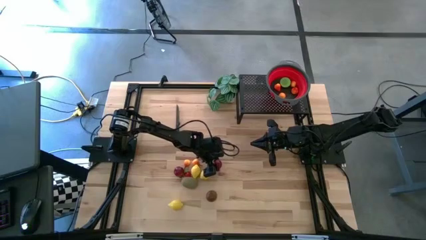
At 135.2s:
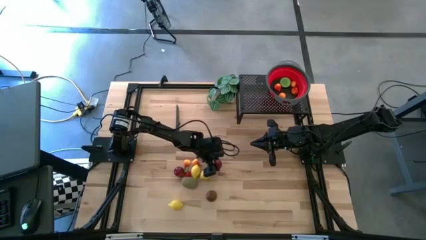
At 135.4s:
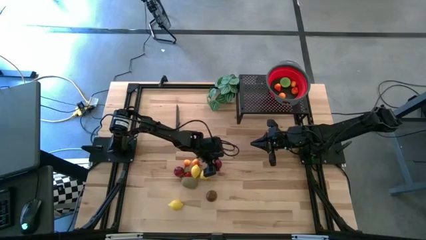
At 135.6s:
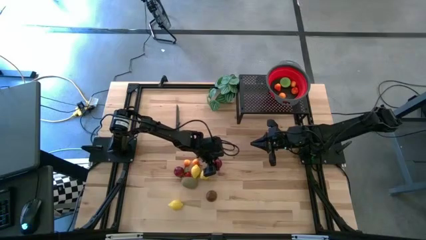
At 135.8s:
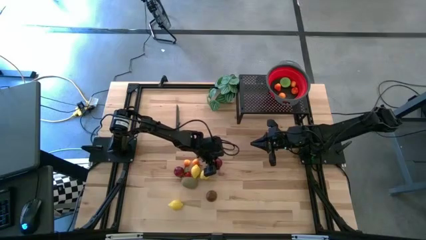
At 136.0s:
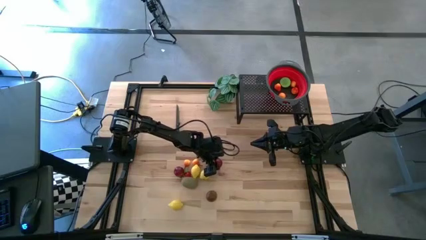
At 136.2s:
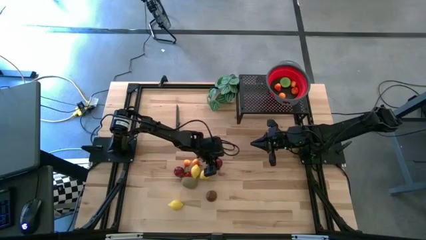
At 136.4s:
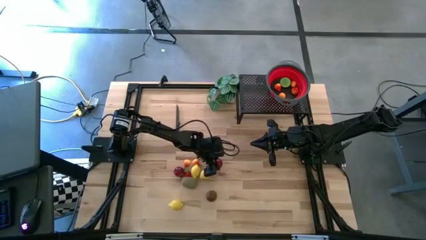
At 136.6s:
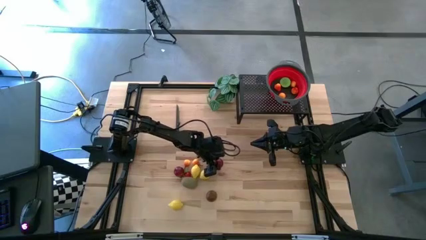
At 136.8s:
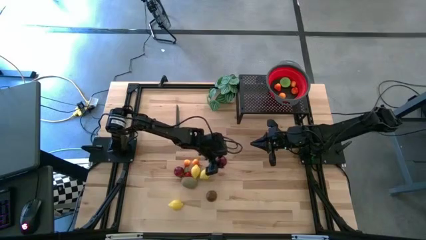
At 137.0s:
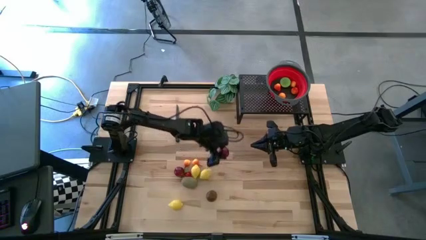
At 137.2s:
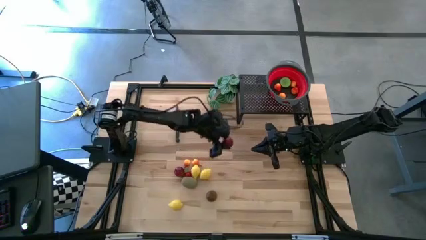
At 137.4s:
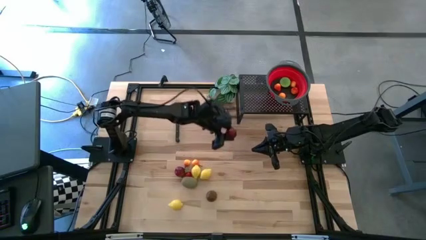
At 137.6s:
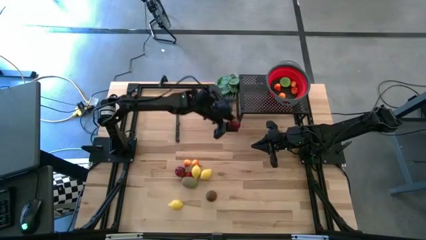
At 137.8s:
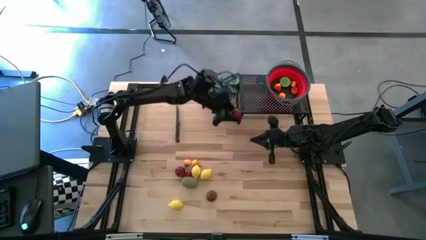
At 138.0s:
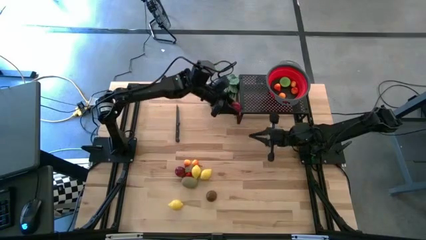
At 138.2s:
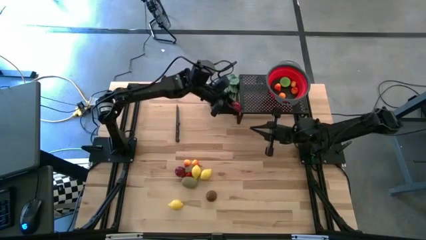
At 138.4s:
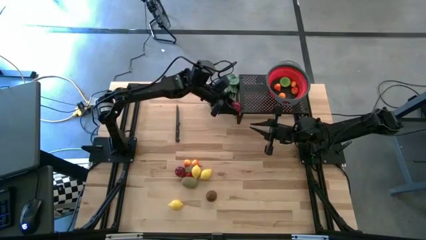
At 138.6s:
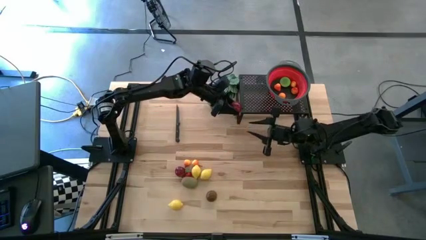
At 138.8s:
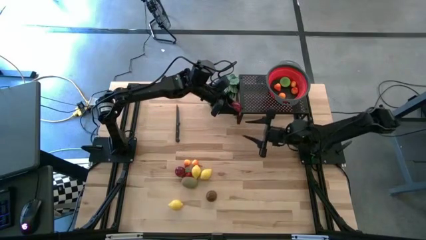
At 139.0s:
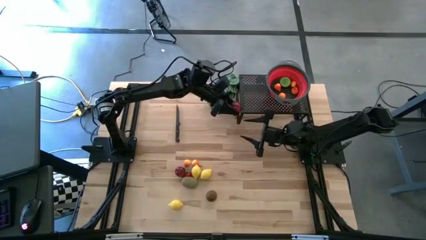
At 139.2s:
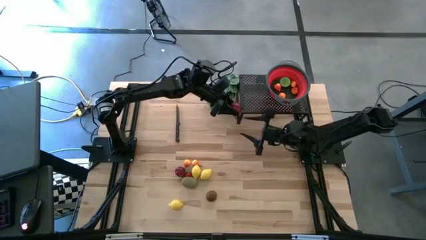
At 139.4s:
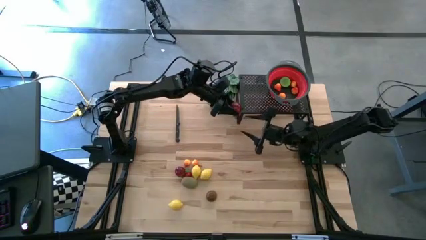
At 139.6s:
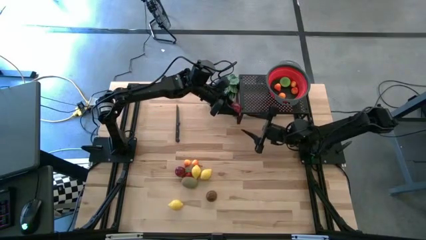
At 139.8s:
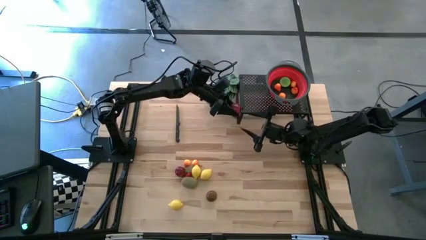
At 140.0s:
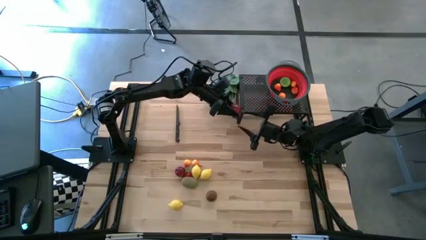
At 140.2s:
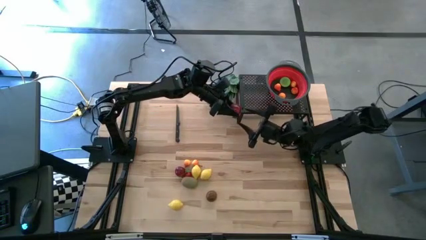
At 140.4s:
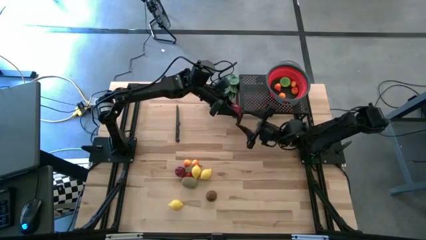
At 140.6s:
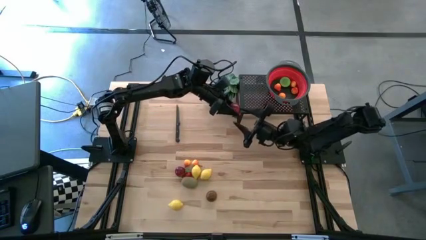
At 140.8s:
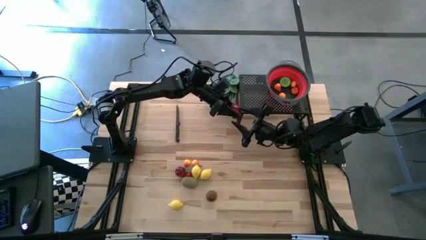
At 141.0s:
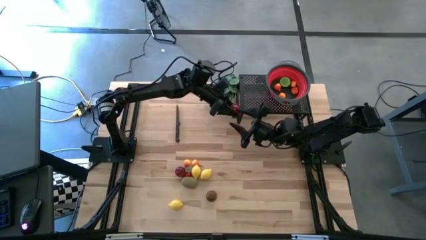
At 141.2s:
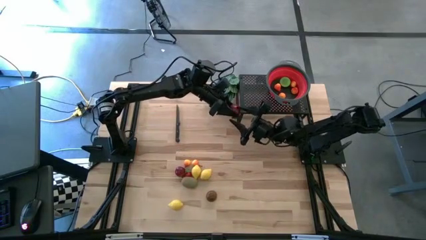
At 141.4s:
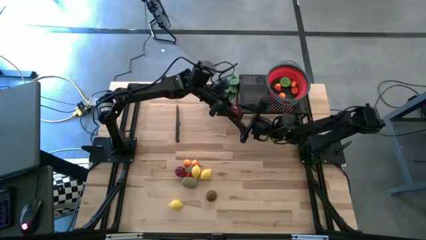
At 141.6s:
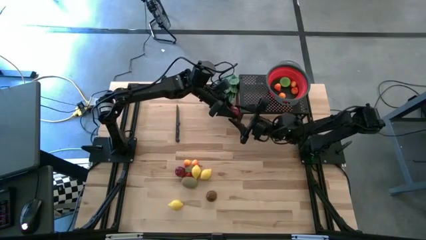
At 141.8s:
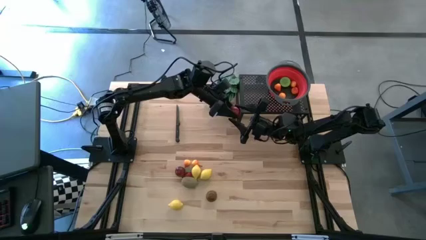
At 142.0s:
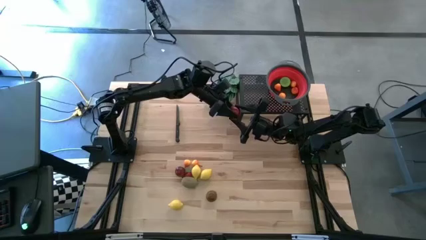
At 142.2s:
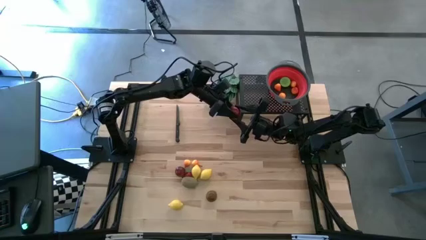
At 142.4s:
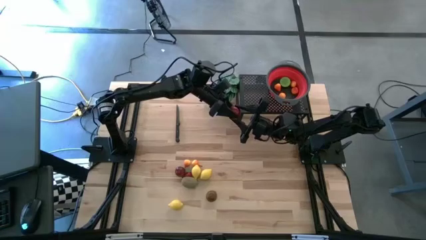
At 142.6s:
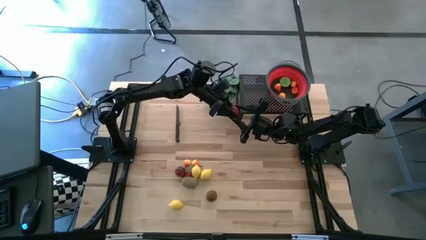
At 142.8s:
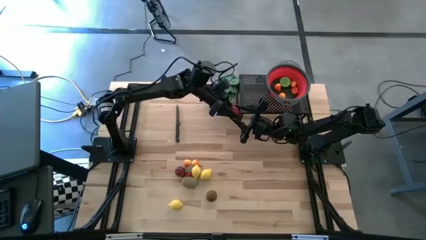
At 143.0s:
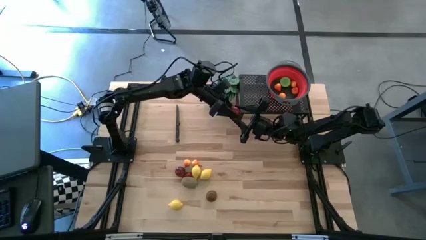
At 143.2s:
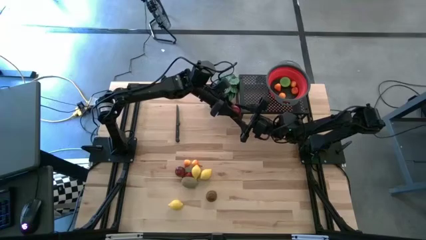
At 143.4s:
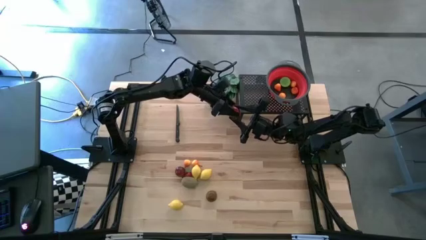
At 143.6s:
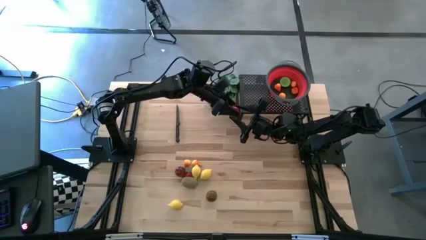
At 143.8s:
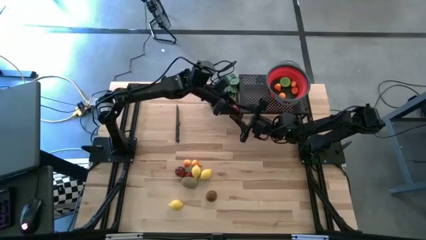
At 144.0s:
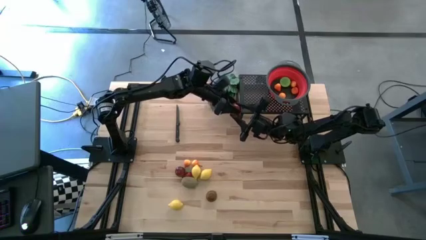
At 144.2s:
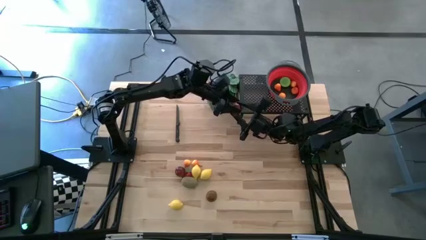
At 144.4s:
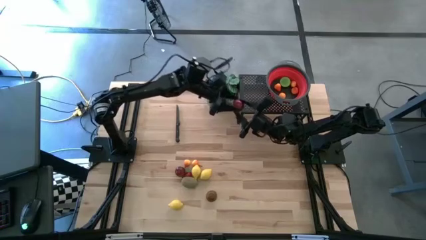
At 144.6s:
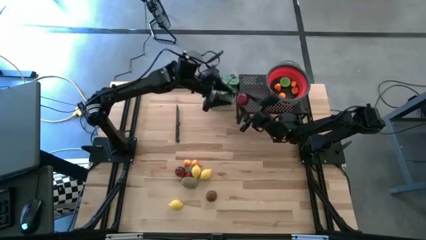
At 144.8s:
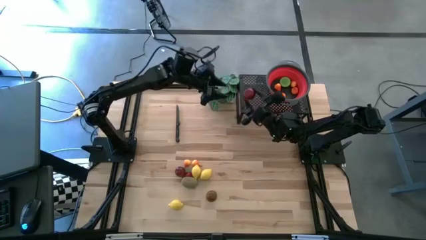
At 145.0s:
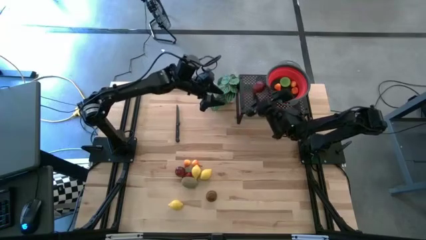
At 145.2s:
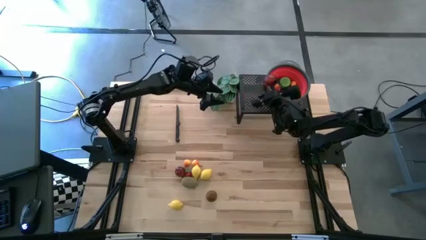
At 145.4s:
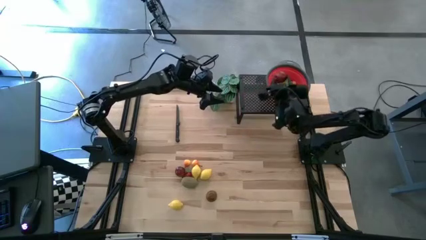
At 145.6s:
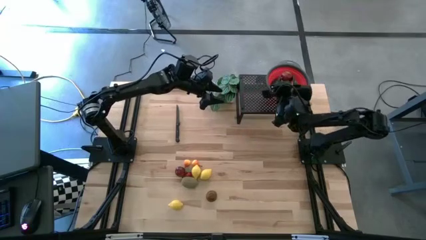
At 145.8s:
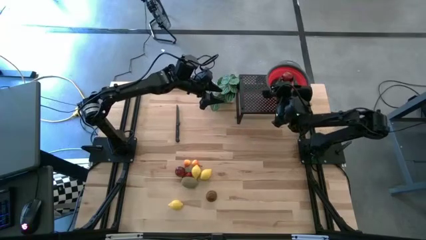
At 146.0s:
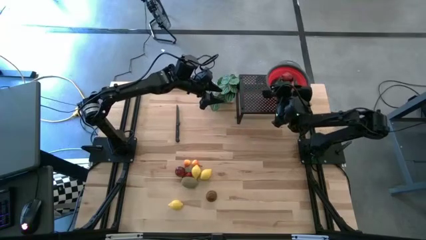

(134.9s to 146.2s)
Task: Pick & Place Fruit
Put the red pomegranate into the red strainer bowl

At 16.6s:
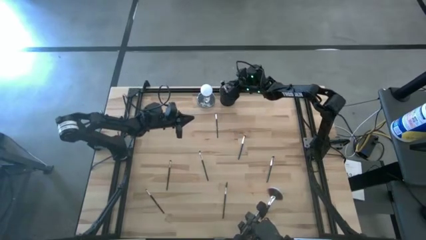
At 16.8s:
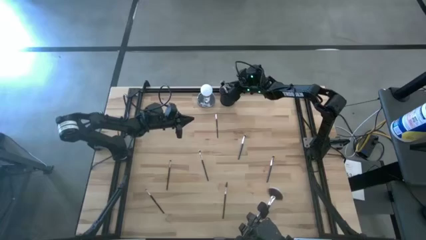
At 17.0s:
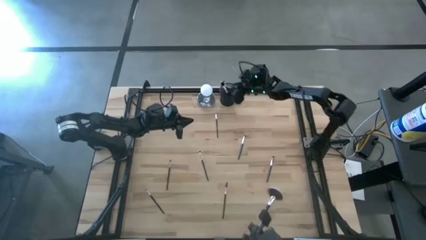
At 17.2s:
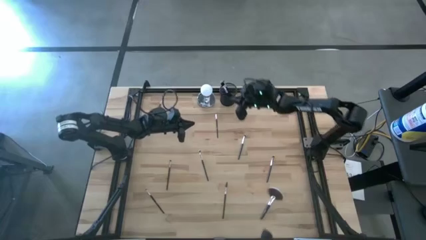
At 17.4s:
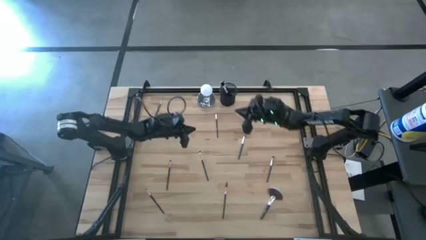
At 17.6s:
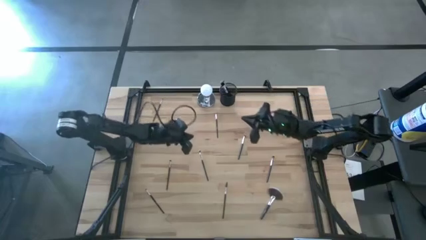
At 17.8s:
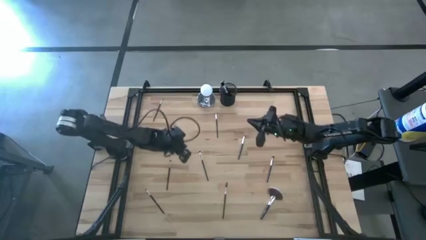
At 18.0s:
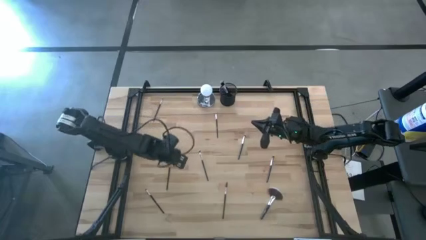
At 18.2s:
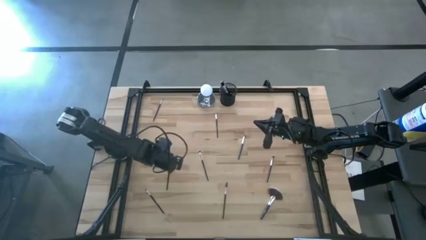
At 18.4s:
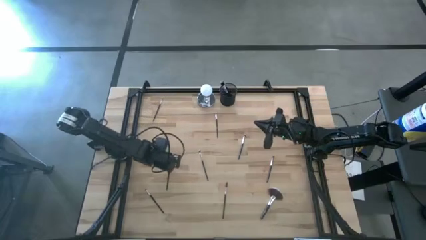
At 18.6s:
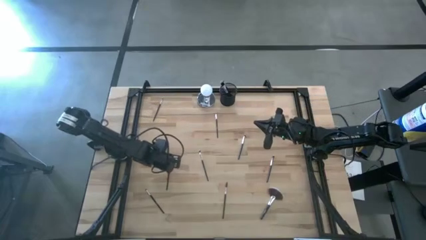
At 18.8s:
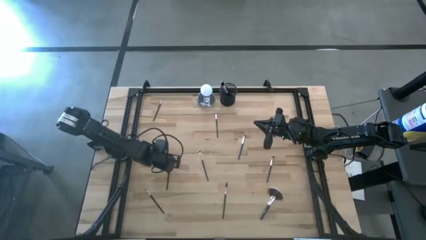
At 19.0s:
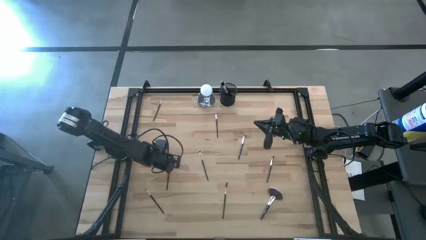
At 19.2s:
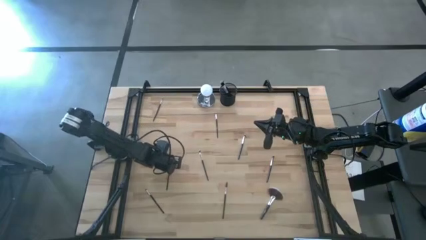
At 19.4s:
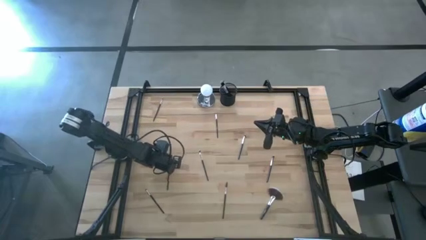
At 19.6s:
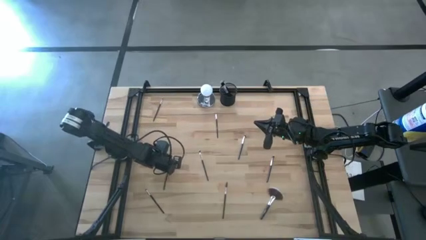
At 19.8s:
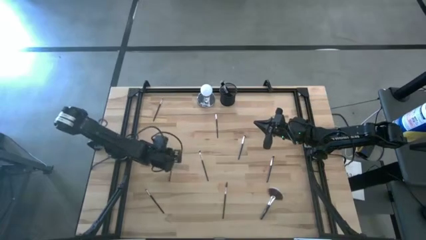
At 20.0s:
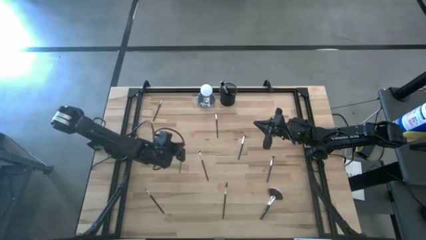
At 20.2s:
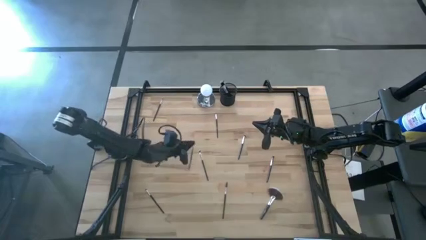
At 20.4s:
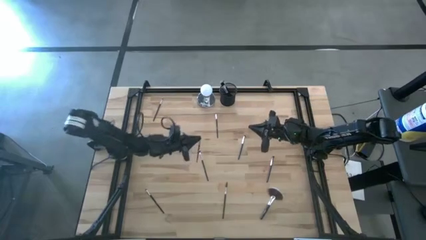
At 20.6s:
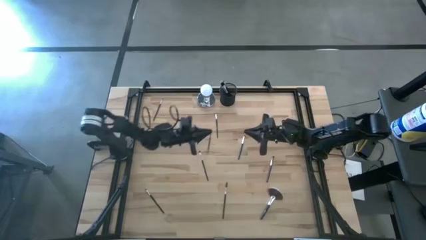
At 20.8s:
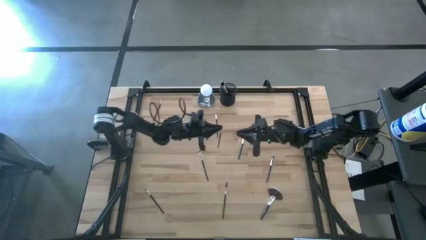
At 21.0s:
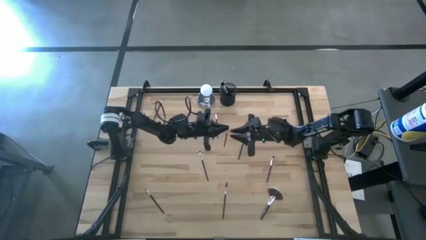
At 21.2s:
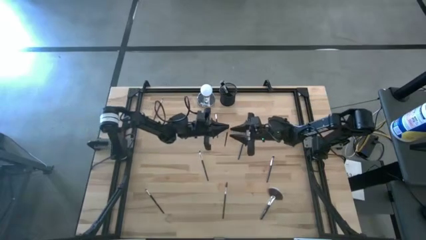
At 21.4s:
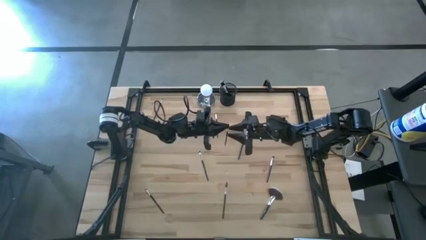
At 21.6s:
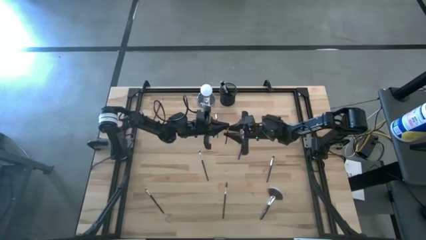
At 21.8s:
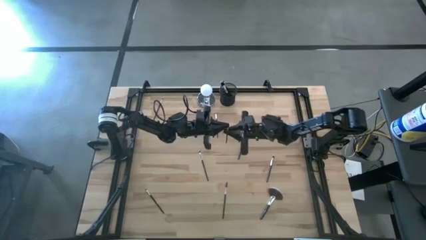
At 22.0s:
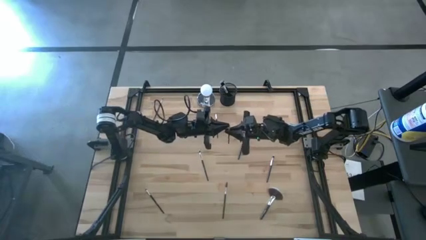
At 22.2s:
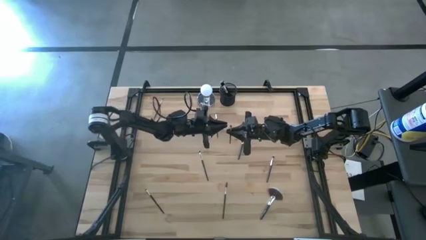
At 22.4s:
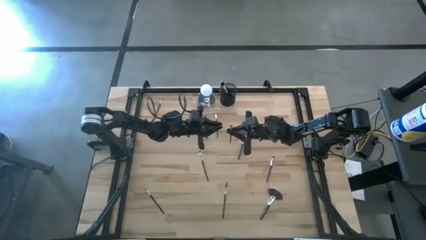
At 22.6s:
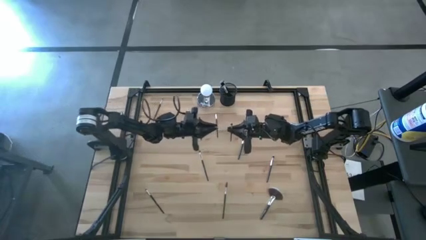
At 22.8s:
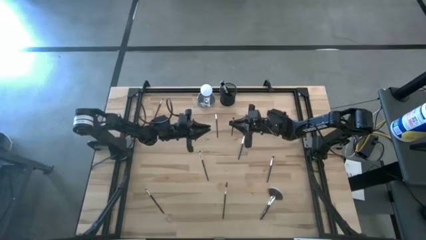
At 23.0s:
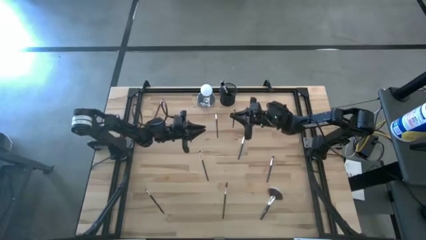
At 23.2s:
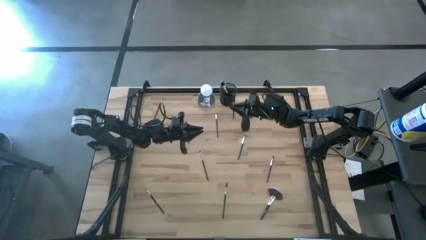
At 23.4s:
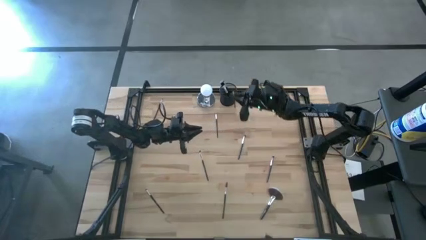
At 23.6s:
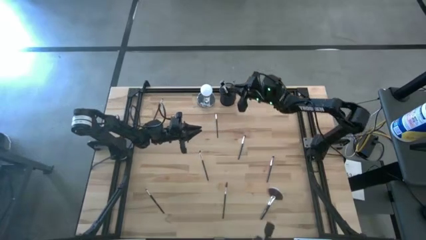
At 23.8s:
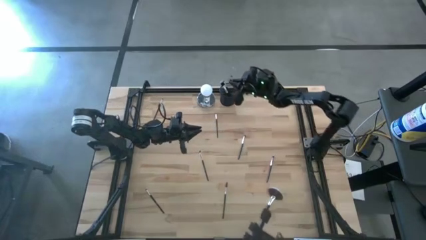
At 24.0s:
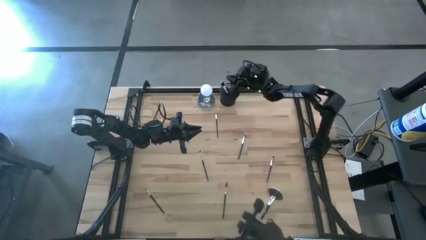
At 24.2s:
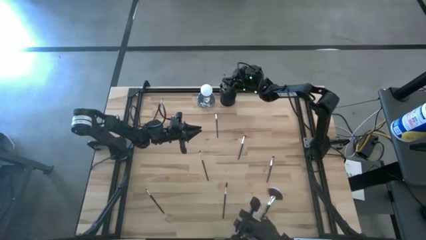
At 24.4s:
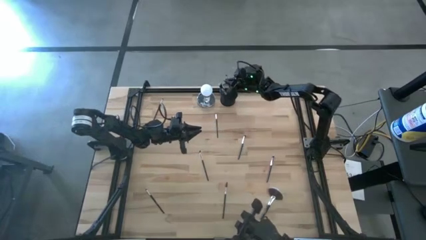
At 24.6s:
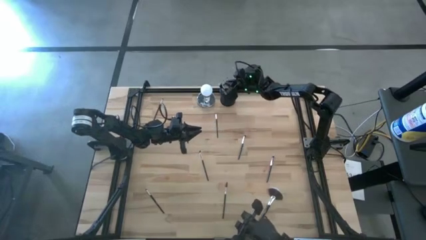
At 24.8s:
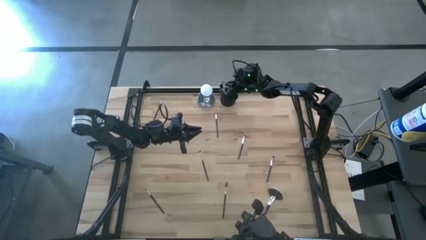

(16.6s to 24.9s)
Task: Pick & Place Makeup Supplies
Put the makeup brush into the black makeup holder
